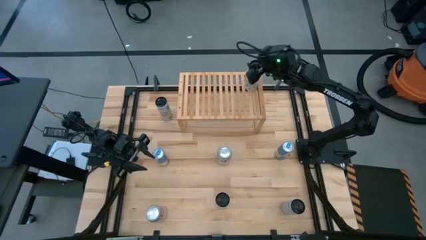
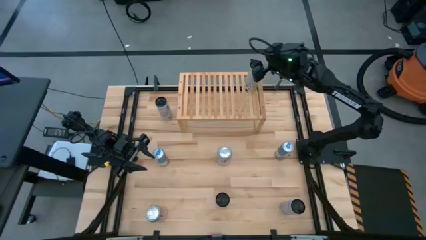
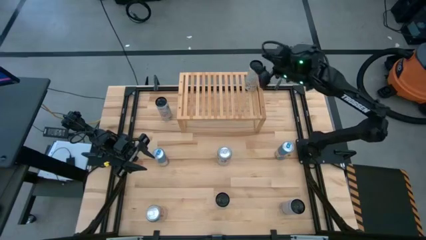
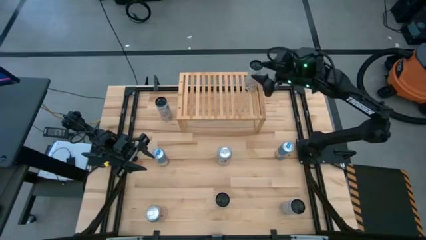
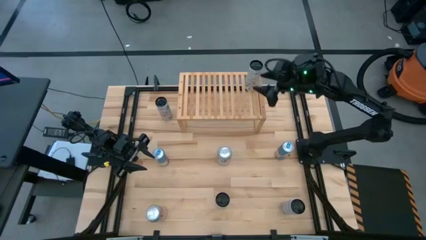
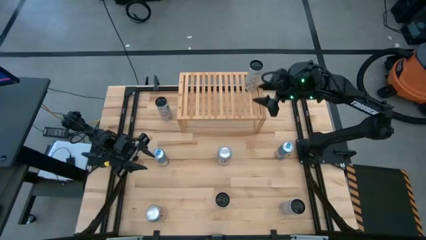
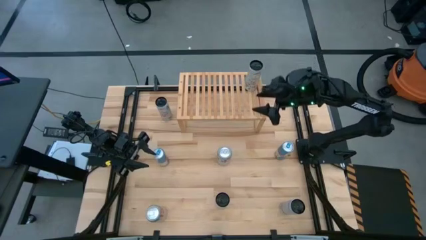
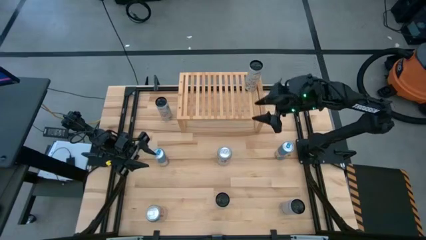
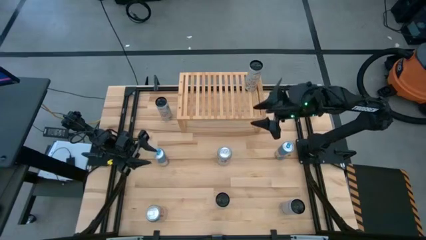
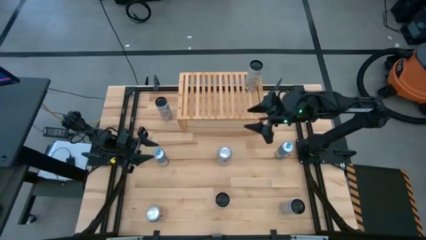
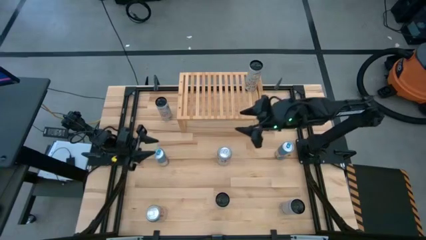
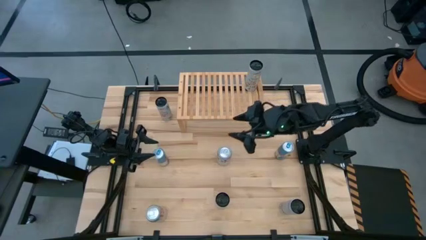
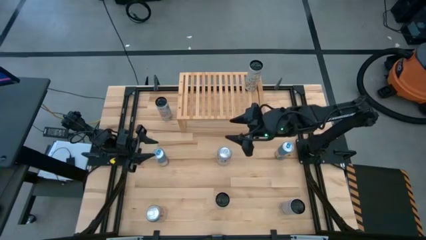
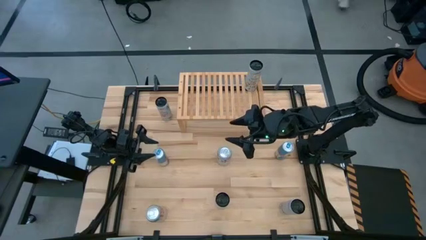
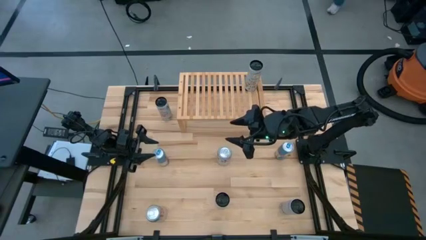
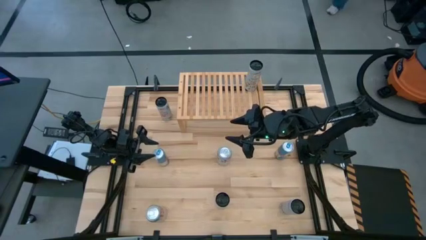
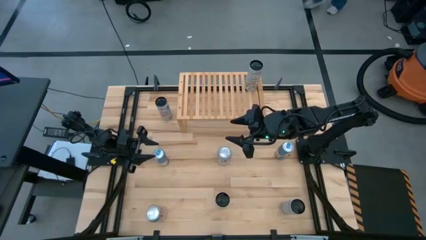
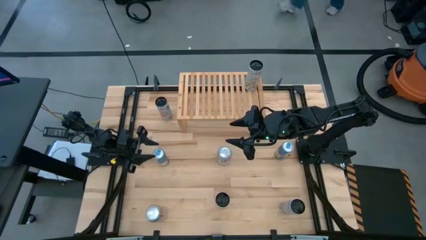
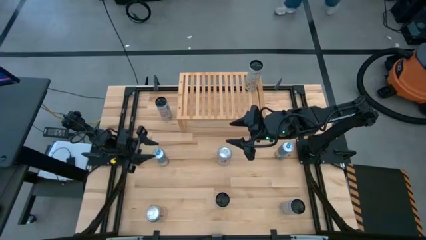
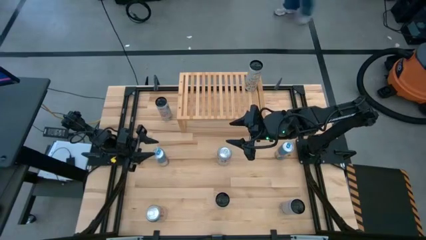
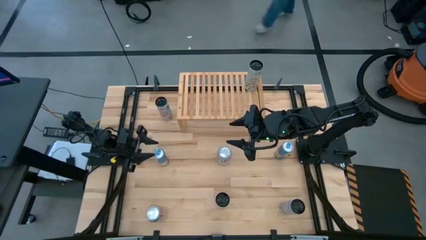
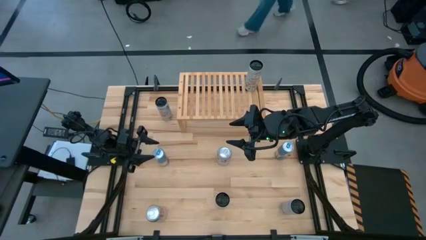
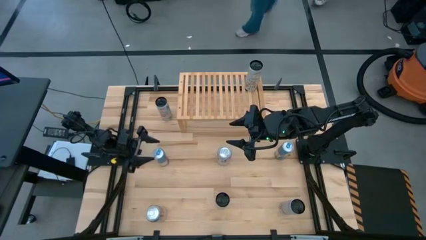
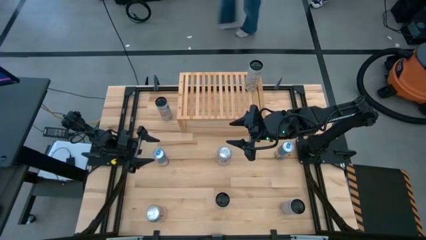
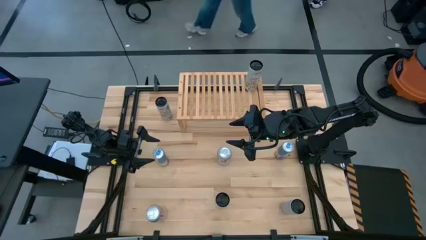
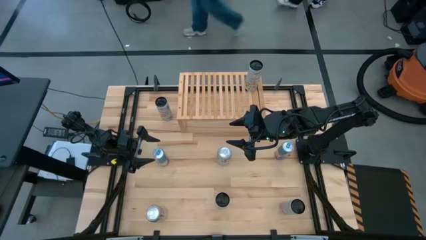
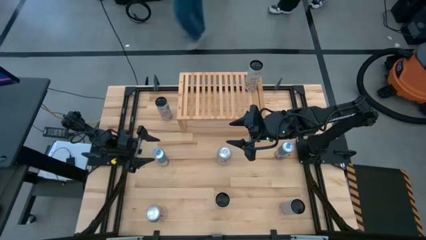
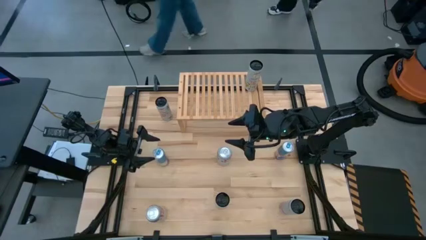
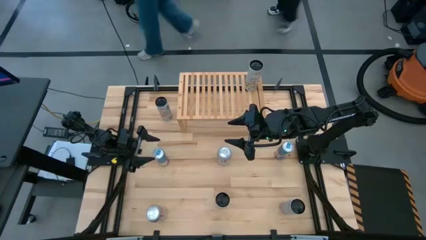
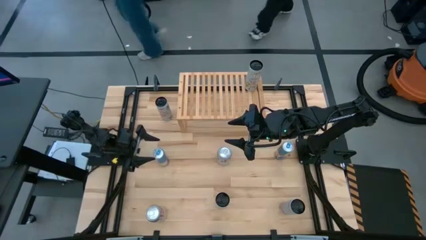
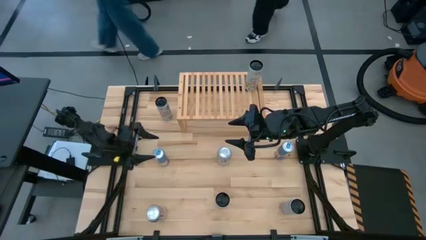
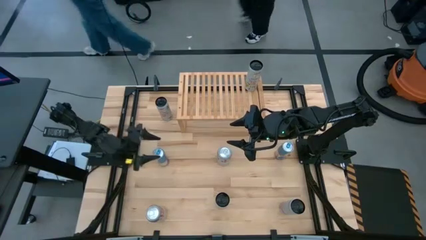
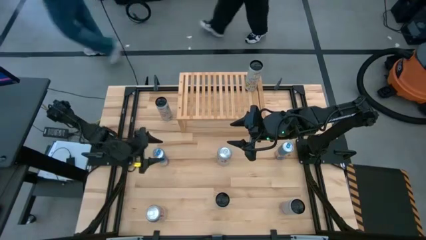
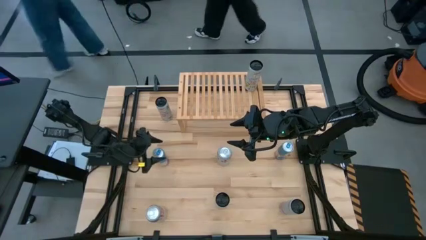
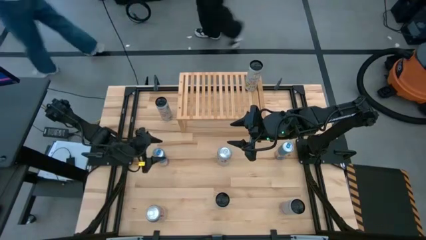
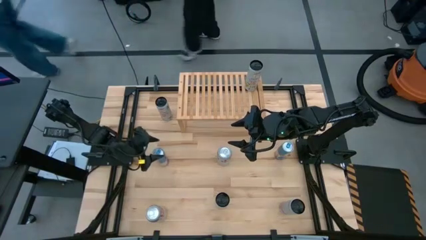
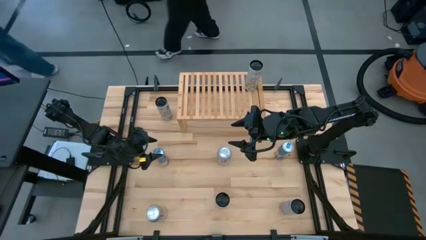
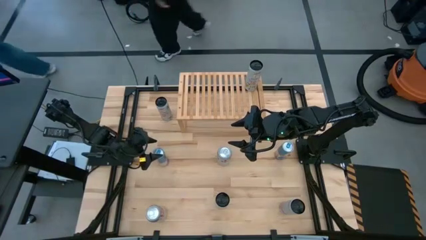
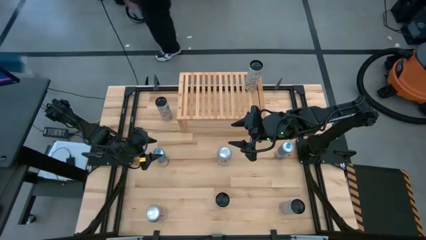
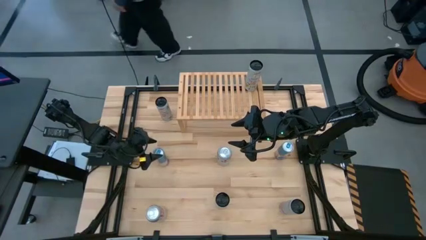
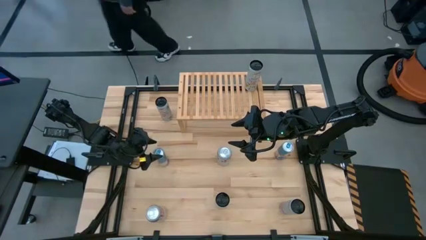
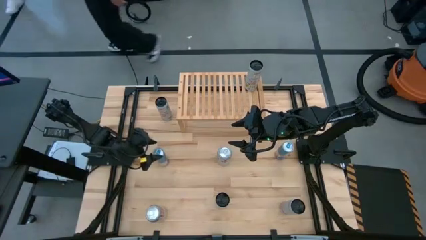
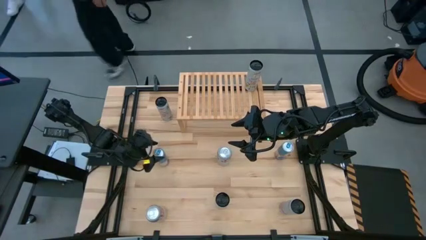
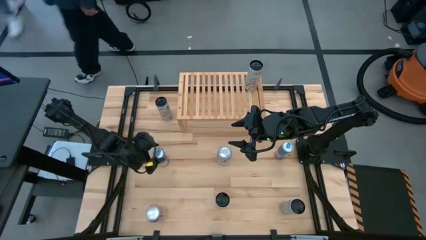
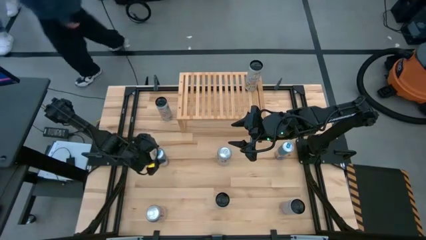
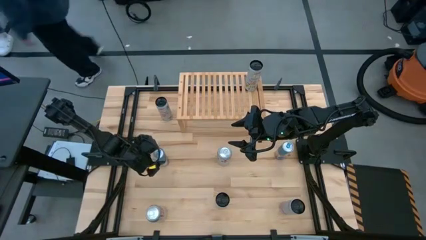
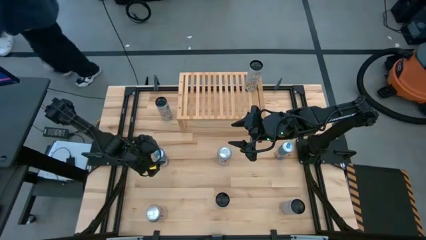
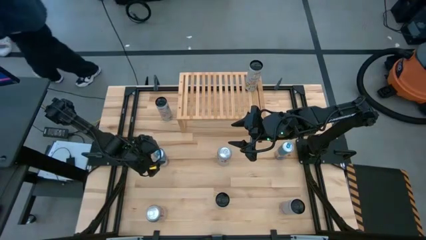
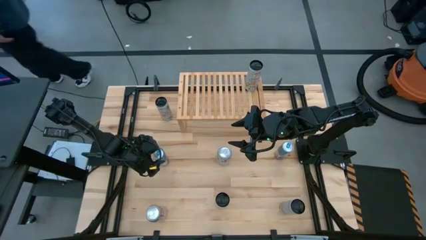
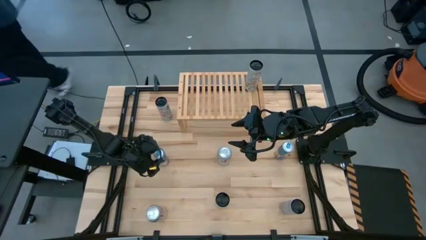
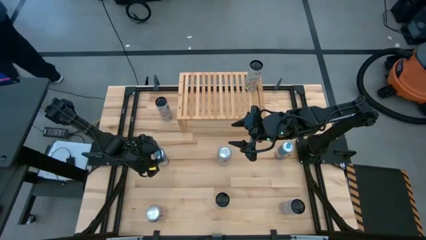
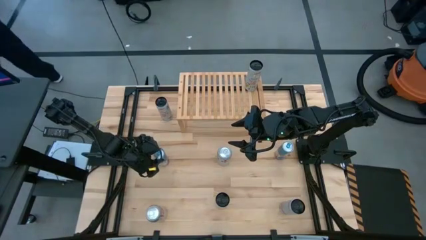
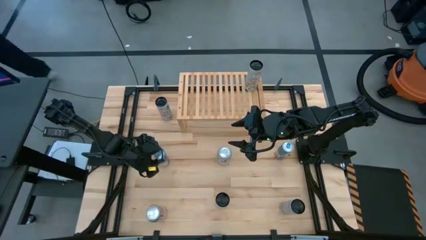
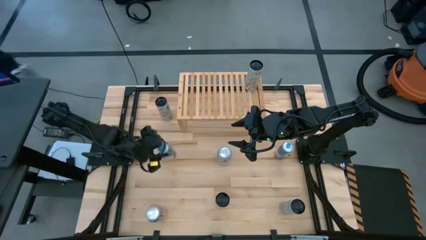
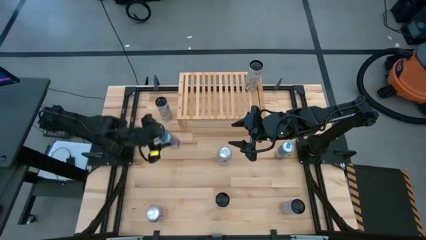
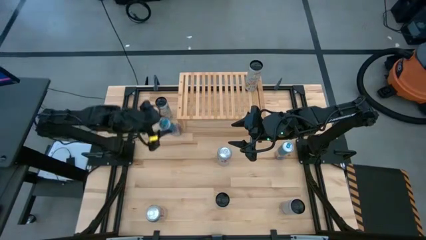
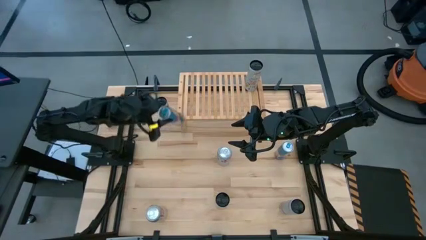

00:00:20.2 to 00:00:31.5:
Task: Place canned beverage on shelf
Put the left blue soda can on the shelf
